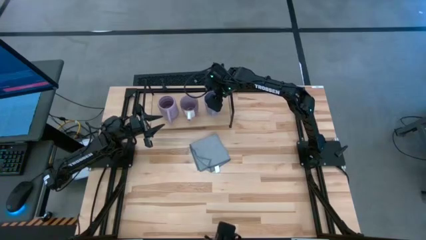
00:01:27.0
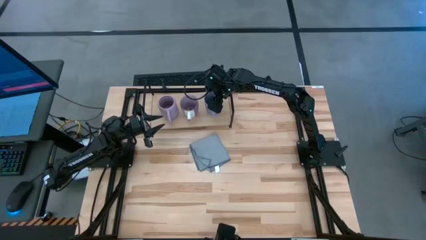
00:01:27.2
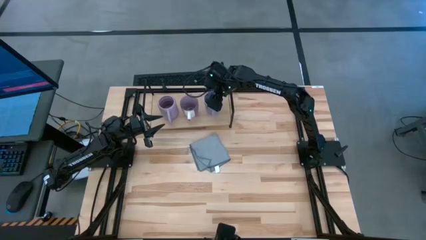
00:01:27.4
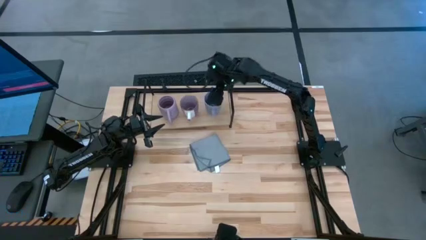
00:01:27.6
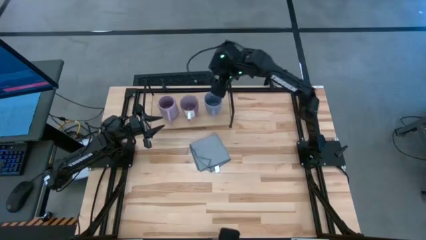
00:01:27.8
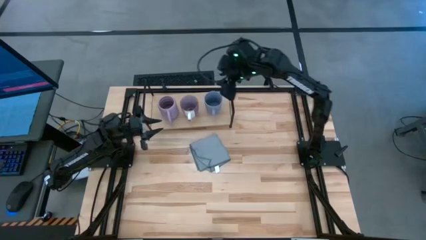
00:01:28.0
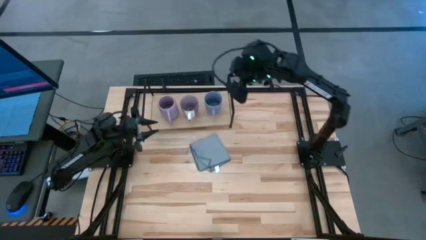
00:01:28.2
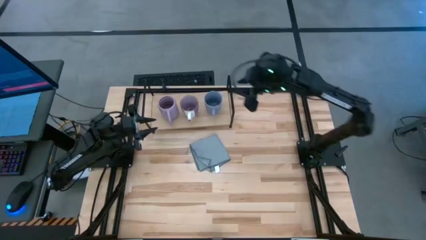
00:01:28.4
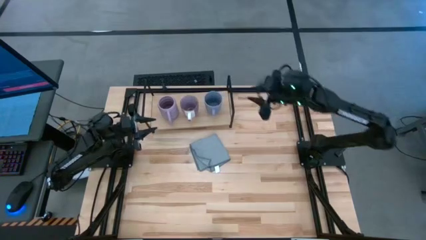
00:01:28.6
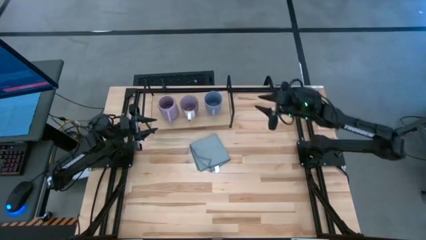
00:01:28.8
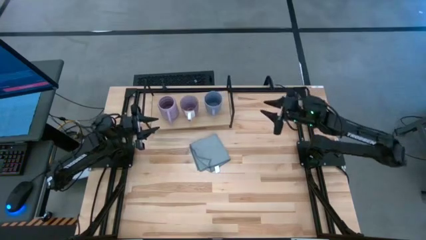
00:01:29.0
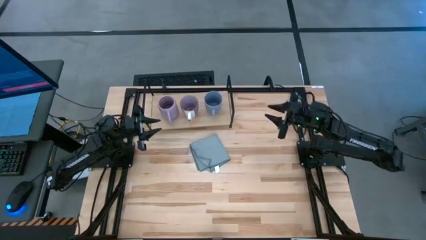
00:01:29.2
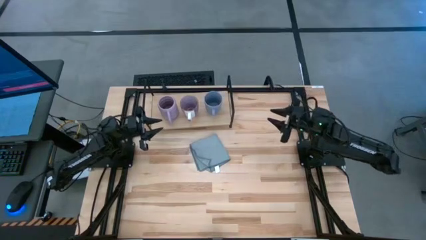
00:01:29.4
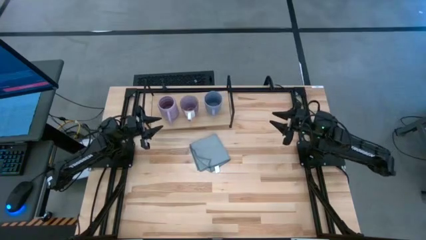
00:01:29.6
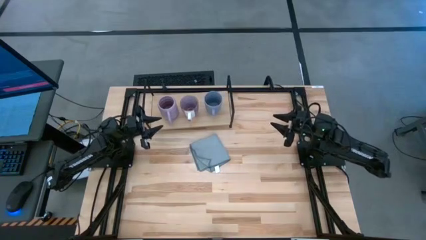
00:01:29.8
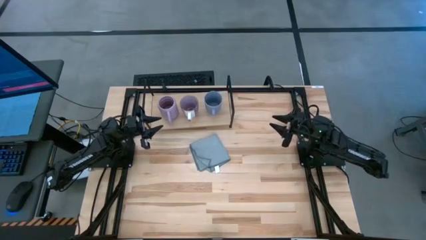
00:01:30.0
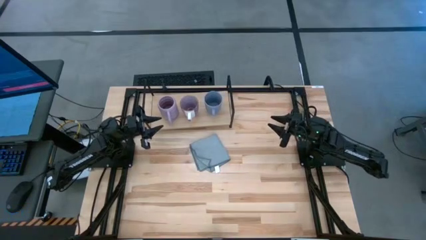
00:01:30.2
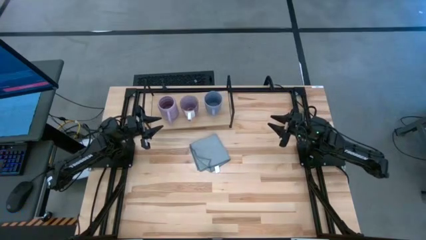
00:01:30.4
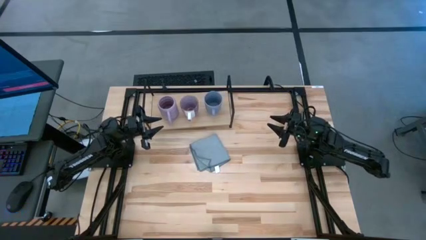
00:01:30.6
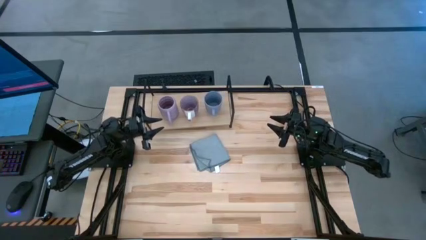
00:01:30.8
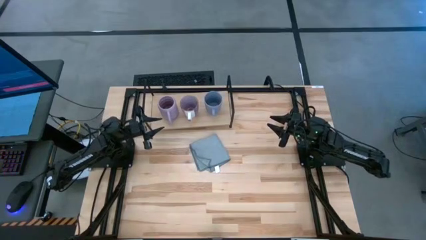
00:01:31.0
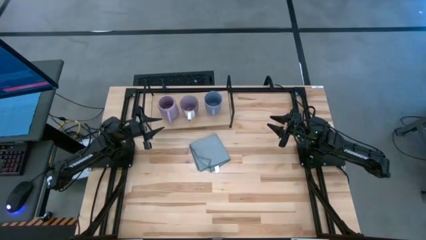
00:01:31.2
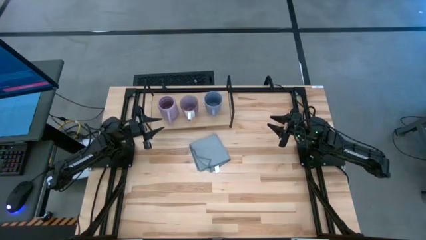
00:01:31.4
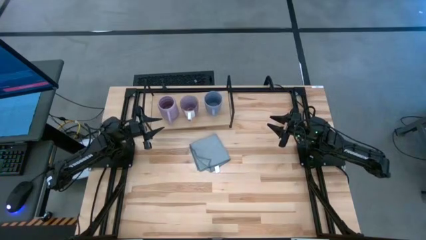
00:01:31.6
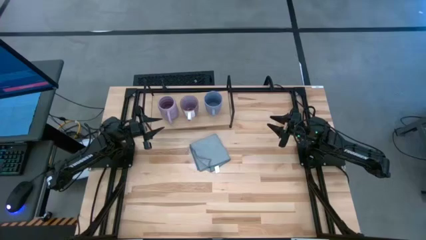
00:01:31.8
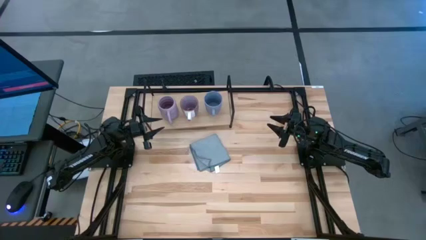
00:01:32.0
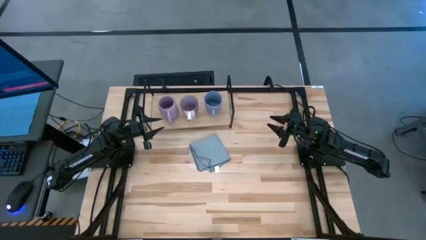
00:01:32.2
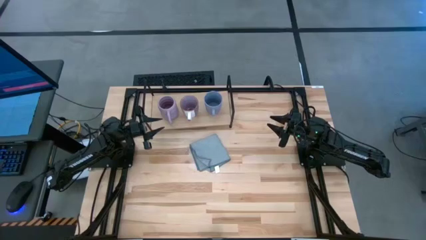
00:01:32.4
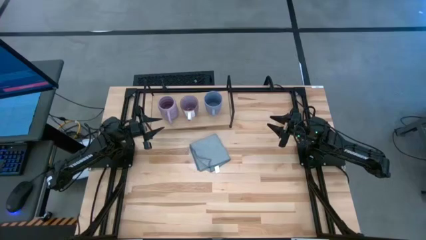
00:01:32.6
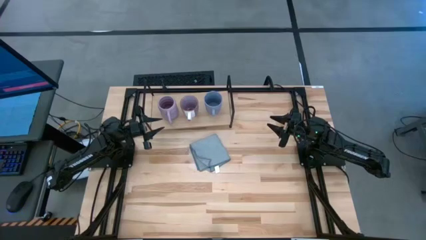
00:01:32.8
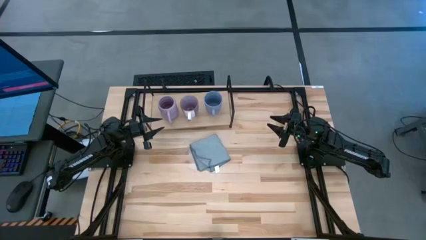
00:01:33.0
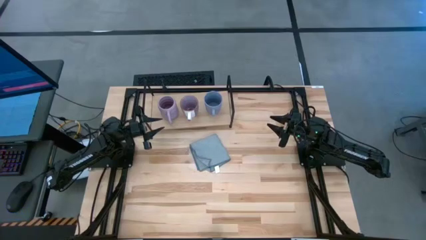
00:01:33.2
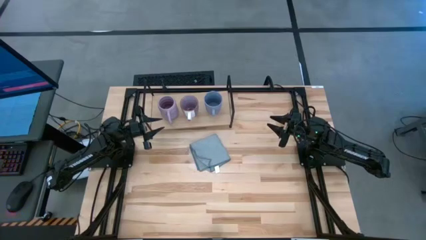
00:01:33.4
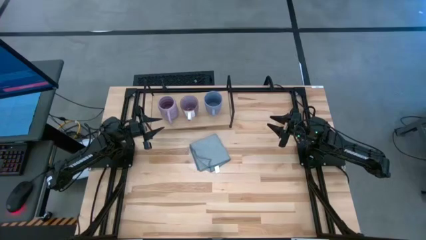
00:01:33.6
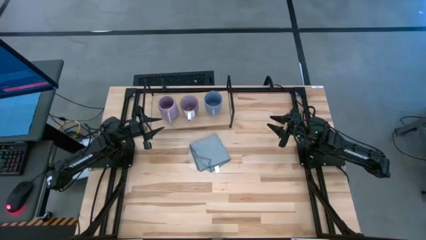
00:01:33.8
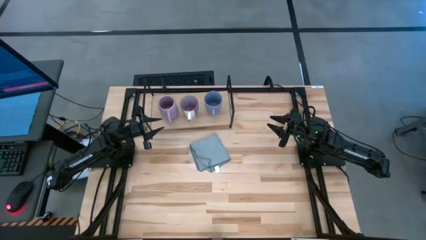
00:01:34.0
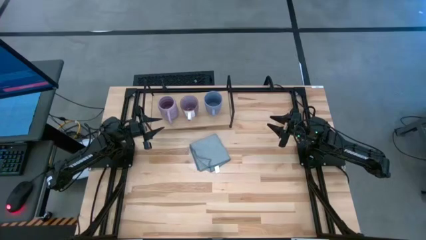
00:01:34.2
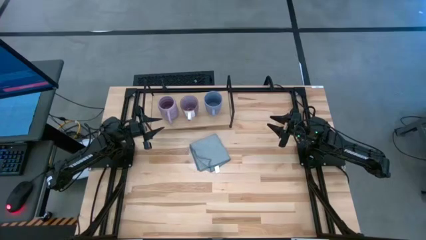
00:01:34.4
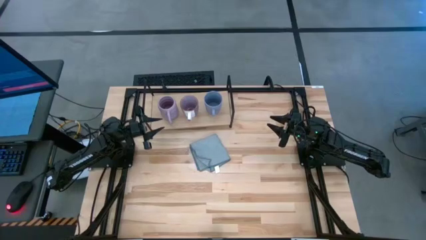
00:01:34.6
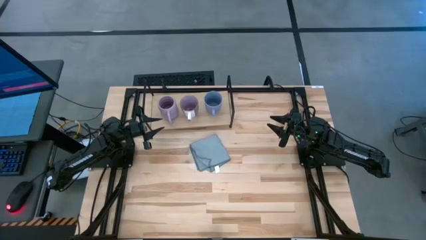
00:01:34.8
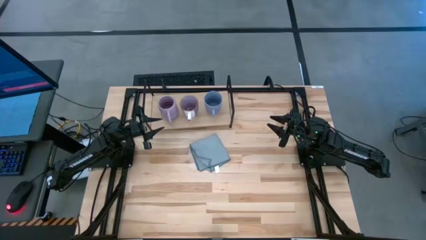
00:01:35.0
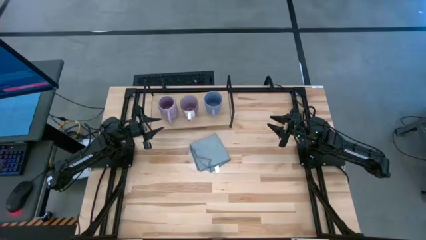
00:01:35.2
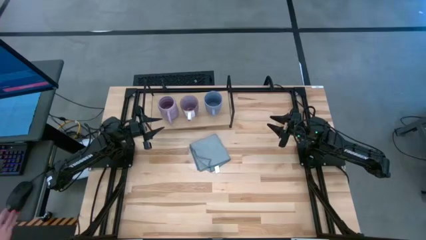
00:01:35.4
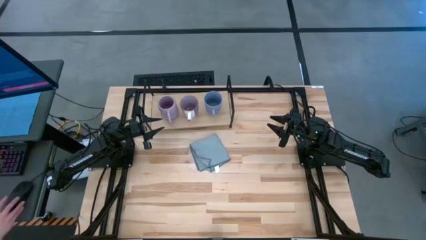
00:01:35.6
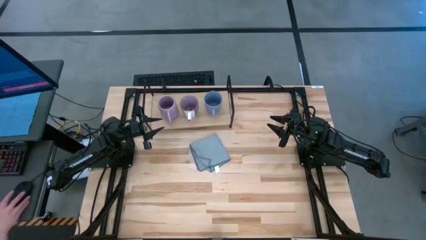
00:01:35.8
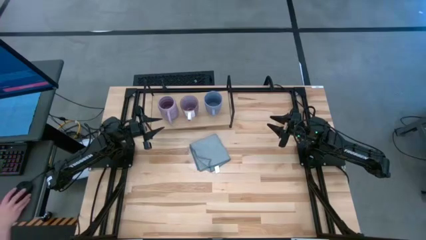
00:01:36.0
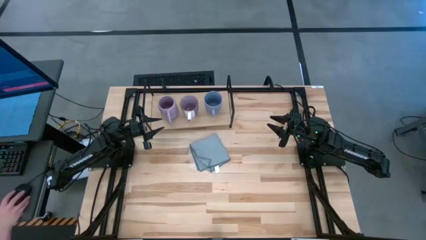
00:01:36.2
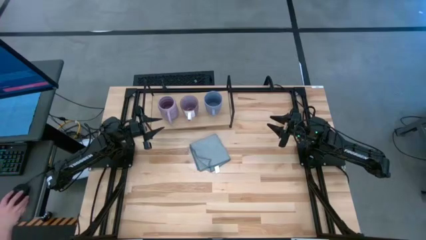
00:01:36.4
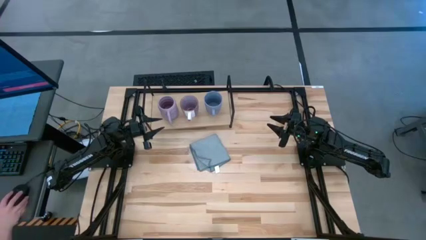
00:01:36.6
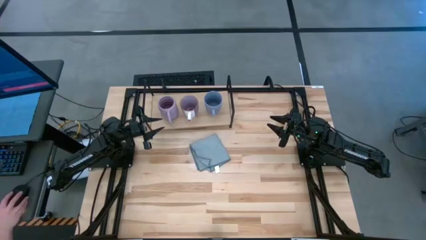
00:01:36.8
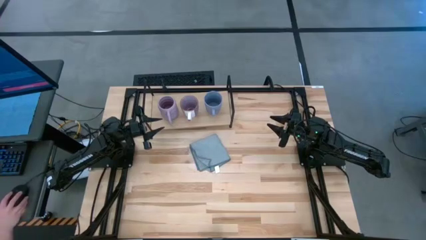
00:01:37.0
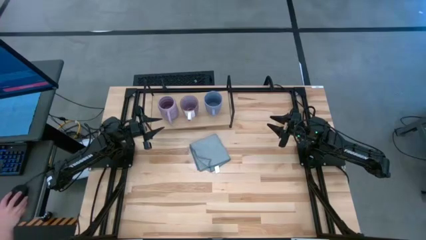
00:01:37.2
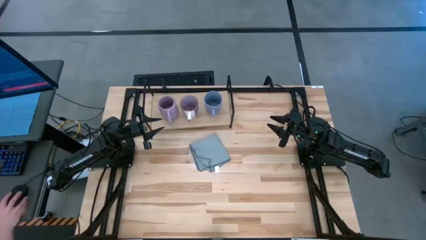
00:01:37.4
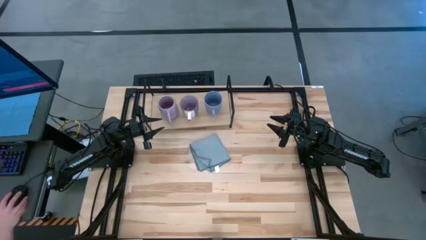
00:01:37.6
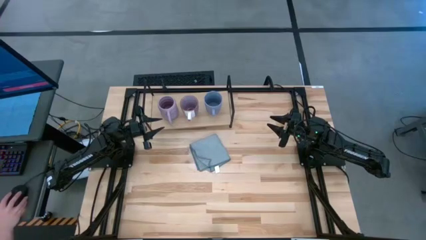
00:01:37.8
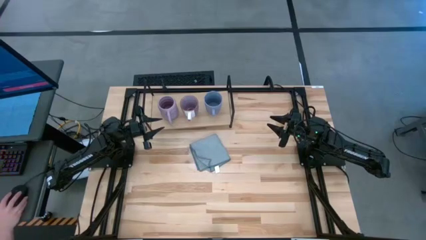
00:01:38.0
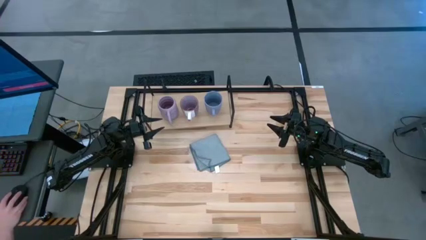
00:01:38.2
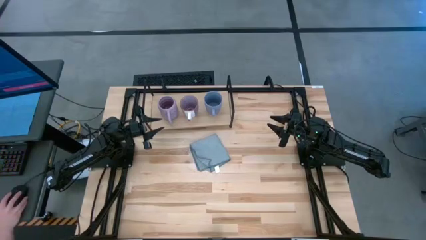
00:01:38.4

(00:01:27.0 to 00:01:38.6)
Task: Stack small to large cups/mugs on shelf
Return to Home Position

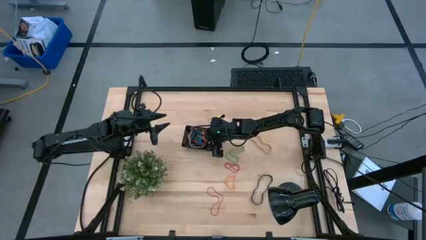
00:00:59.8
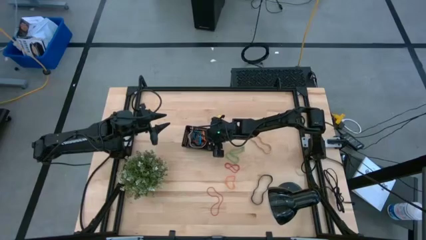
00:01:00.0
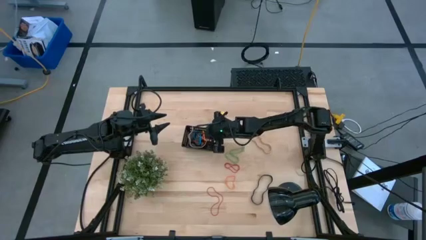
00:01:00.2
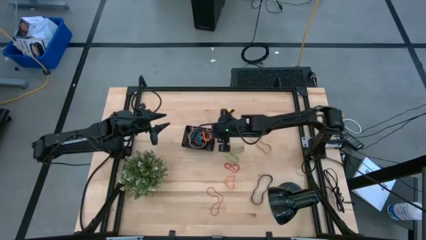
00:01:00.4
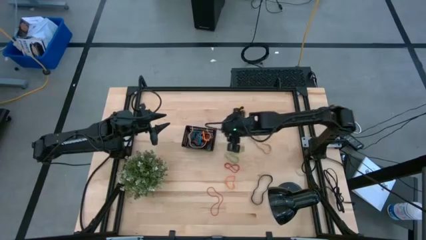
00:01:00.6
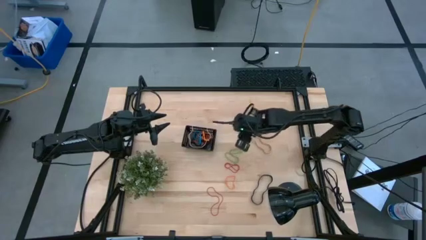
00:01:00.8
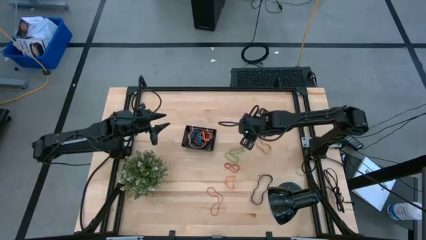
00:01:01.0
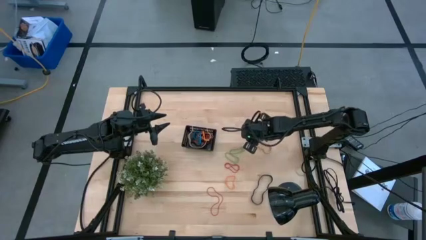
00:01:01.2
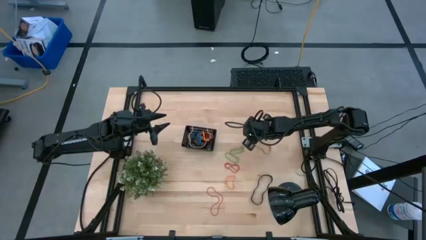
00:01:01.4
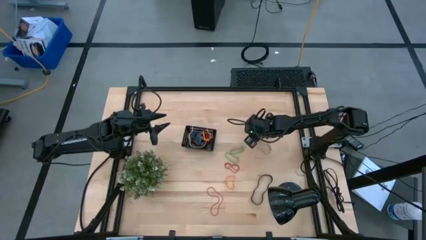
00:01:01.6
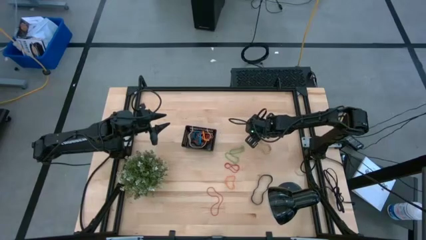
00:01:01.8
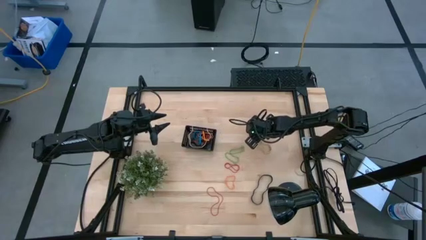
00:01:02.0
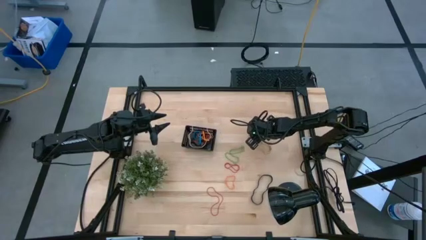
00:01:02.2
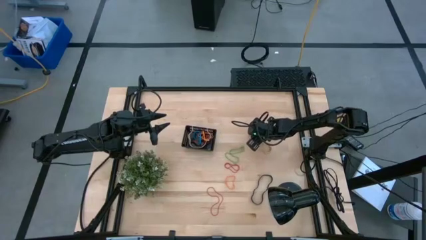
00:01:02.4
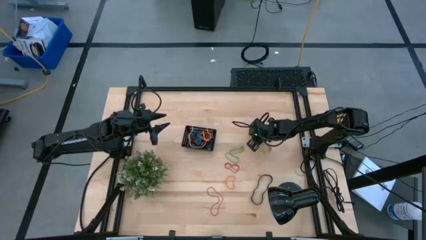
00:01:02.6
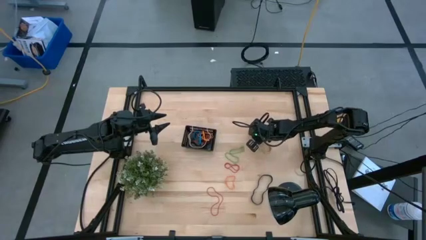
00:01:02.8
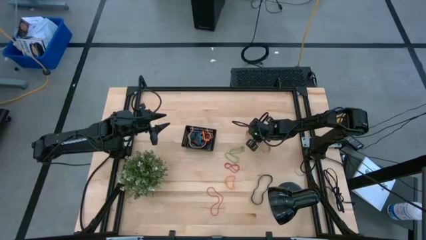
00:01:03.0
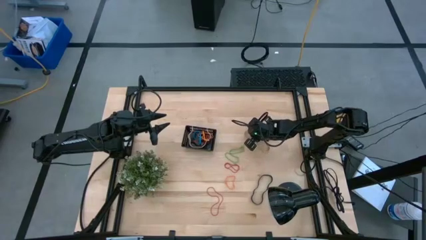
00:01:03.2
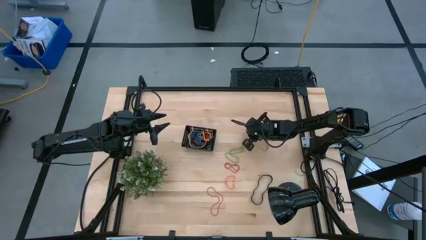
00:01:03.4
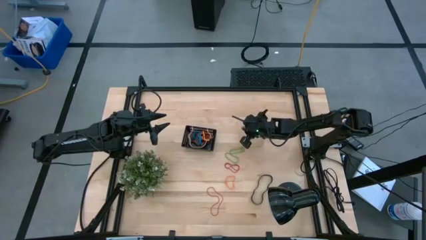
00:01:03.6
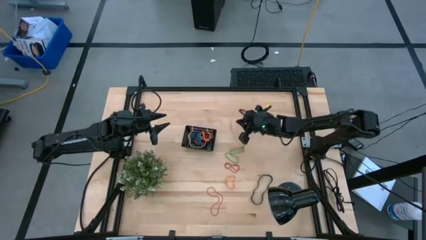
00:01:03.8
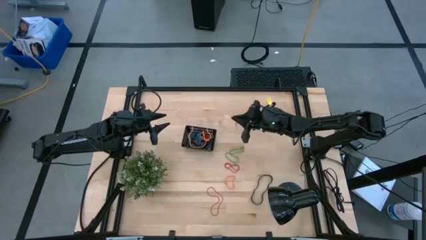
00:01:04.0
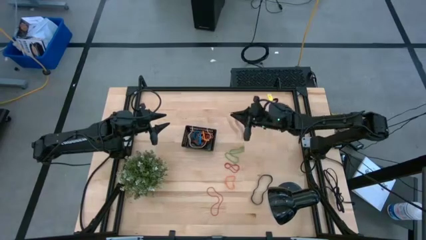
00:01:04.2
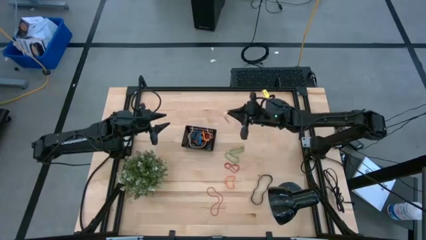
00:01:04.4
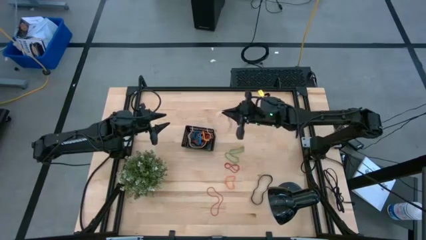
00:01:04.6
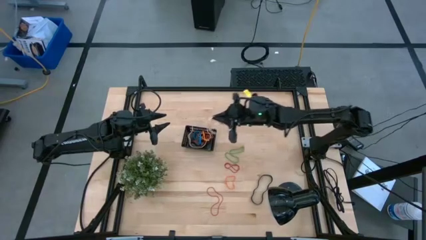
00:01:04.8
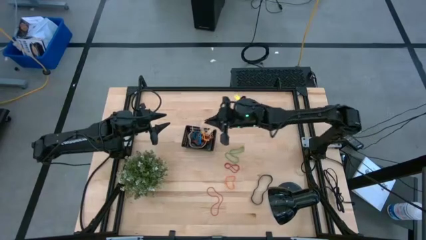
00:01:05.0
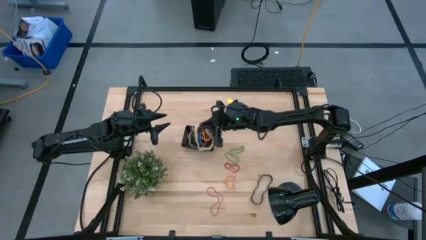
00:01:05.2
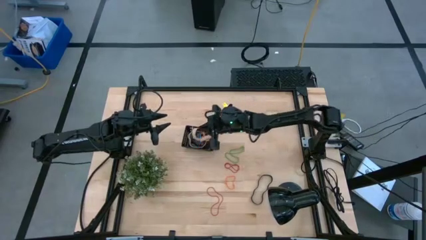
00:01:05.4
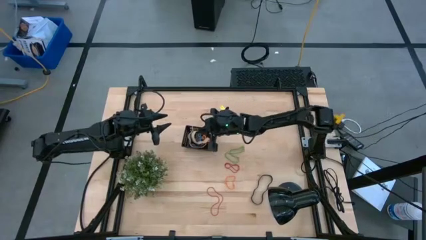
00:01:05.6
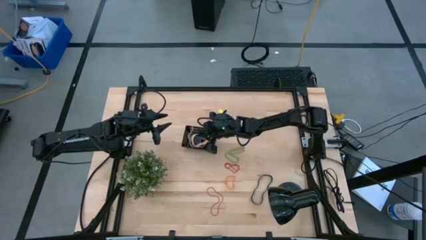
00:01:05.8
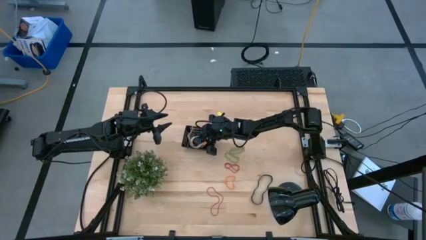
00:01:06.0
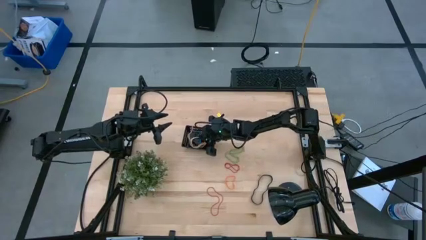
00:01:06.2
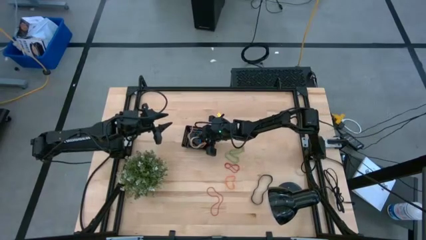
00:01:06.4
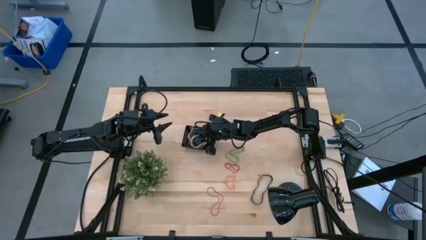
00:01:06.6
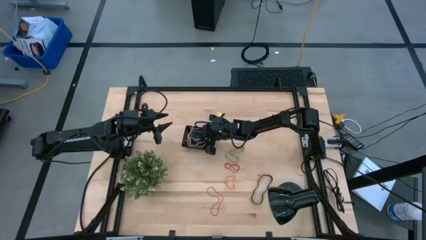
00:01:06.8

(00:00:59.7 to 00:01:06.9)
Task: Pick and place rubber bands into bin
Put the white rubber band into the black bin
